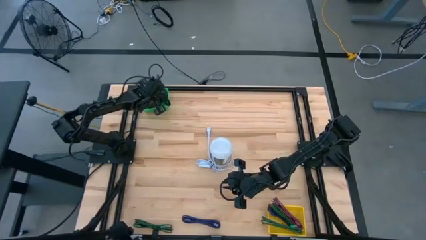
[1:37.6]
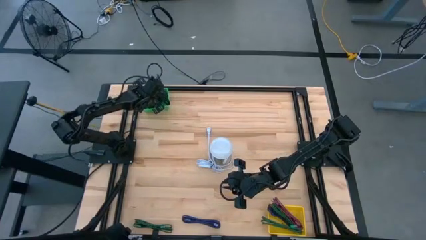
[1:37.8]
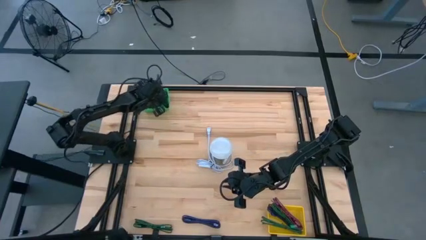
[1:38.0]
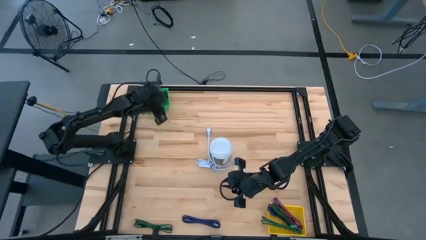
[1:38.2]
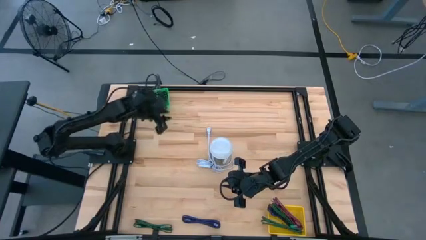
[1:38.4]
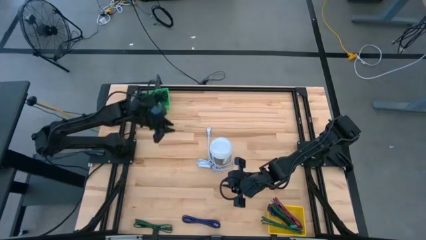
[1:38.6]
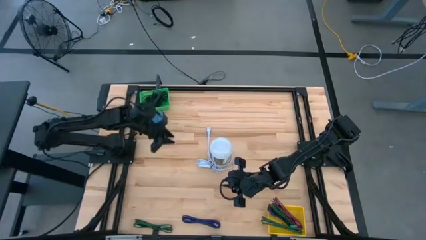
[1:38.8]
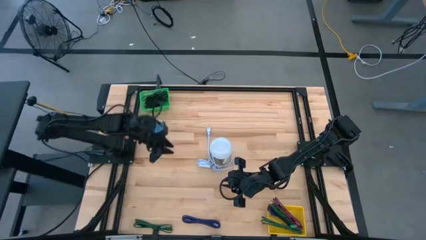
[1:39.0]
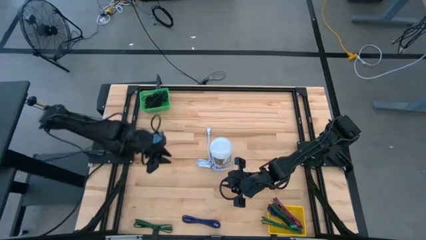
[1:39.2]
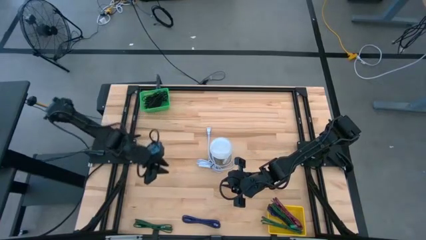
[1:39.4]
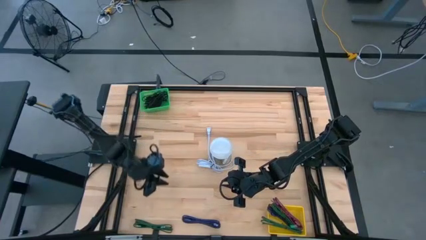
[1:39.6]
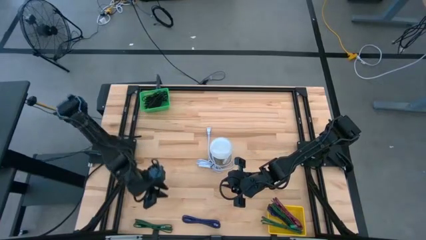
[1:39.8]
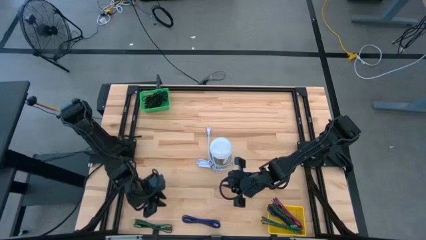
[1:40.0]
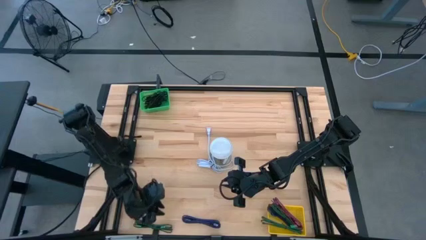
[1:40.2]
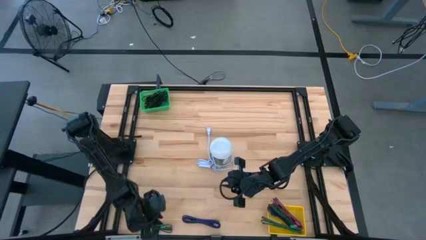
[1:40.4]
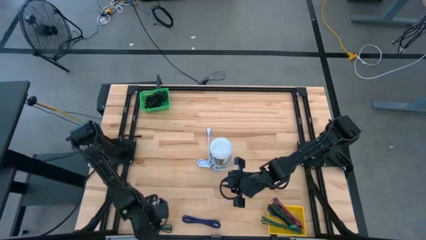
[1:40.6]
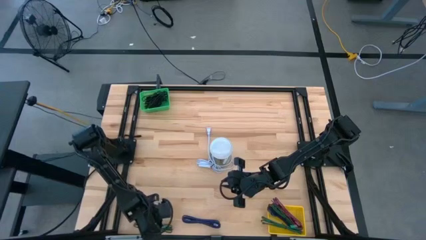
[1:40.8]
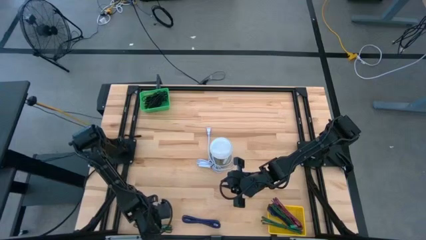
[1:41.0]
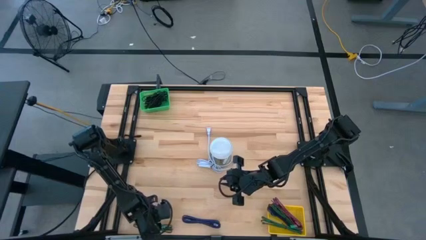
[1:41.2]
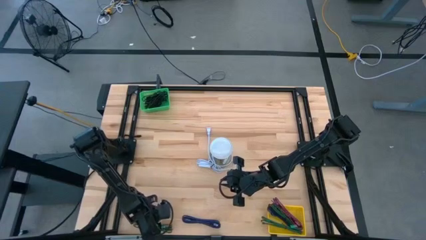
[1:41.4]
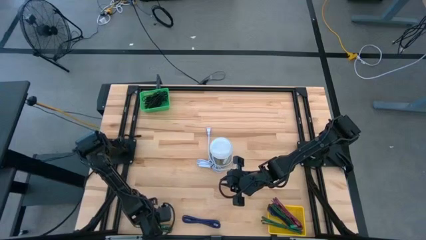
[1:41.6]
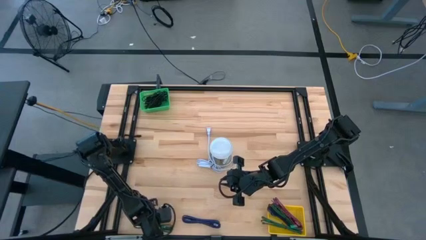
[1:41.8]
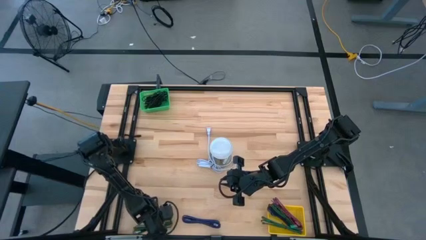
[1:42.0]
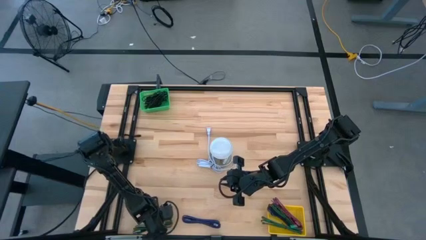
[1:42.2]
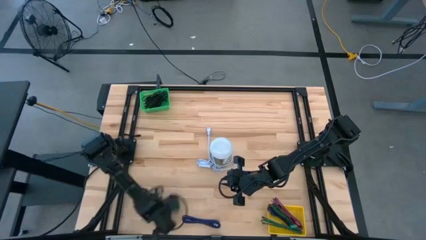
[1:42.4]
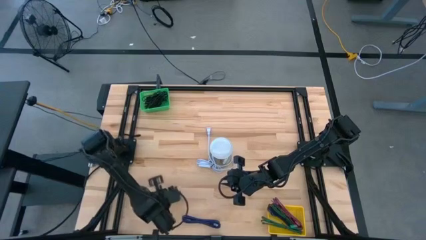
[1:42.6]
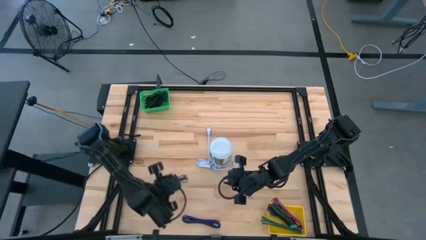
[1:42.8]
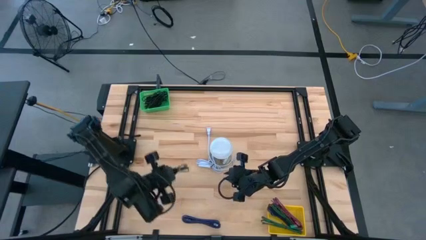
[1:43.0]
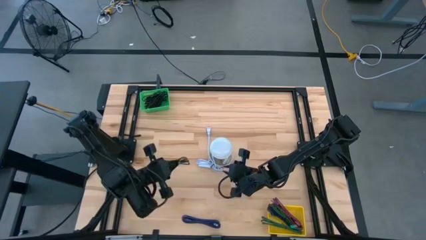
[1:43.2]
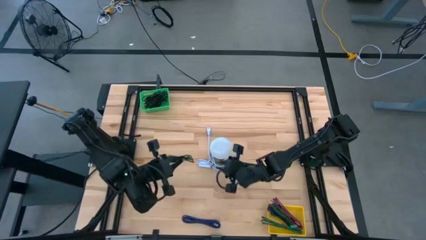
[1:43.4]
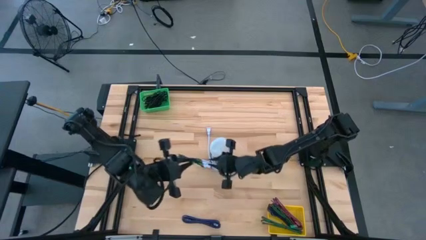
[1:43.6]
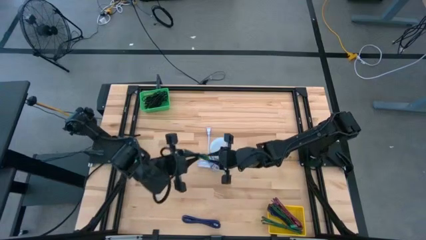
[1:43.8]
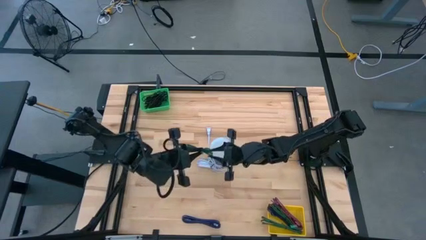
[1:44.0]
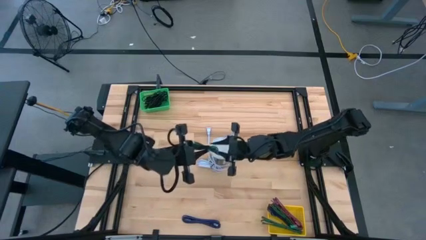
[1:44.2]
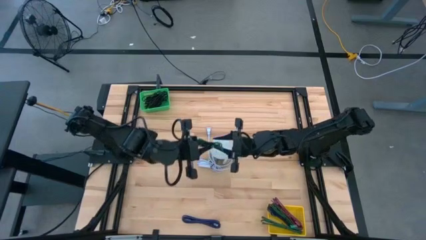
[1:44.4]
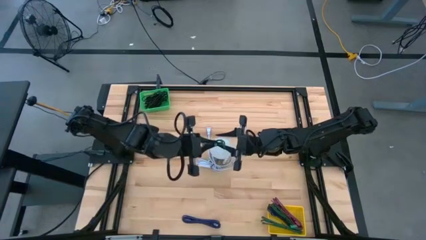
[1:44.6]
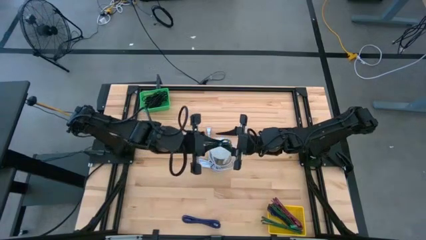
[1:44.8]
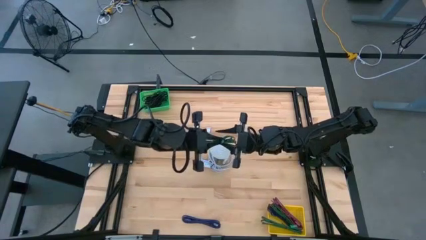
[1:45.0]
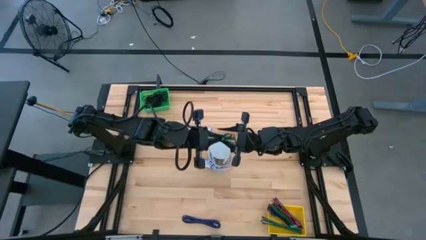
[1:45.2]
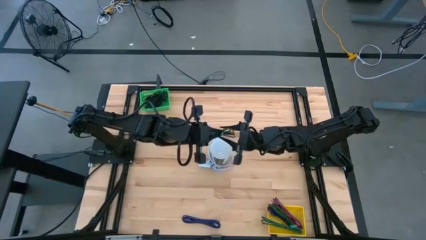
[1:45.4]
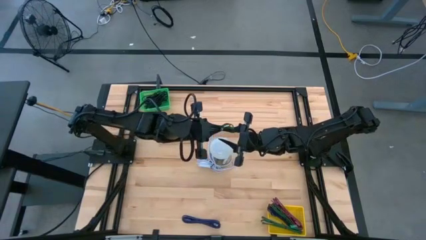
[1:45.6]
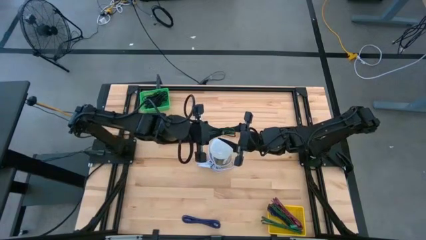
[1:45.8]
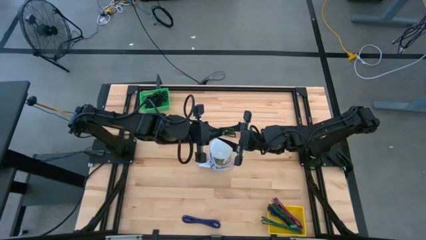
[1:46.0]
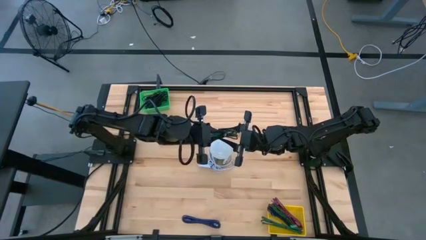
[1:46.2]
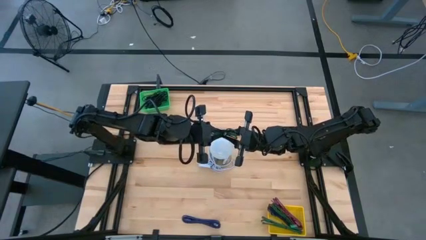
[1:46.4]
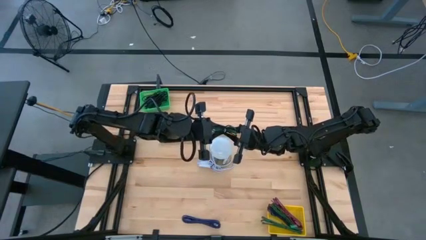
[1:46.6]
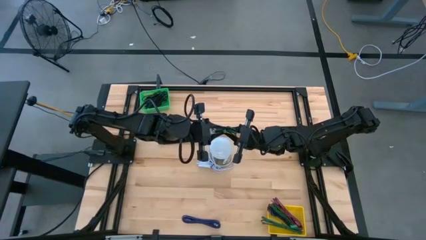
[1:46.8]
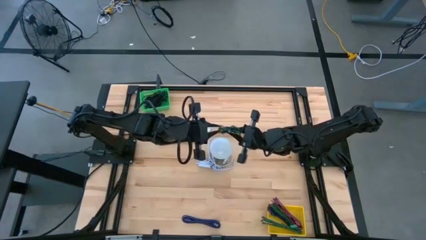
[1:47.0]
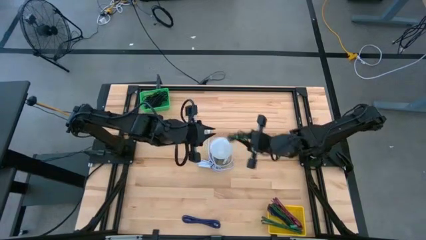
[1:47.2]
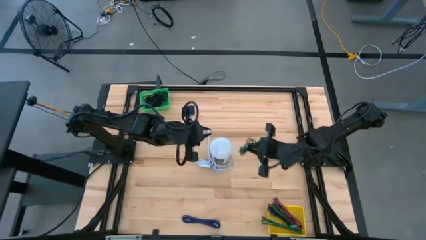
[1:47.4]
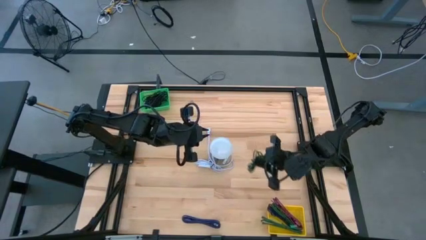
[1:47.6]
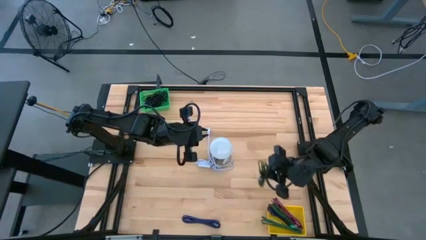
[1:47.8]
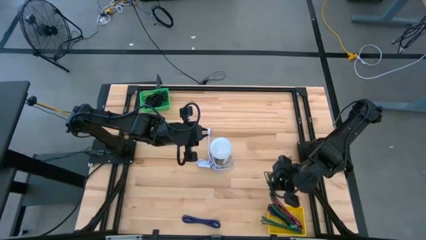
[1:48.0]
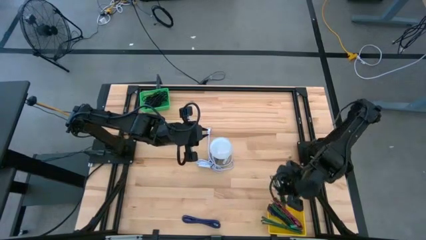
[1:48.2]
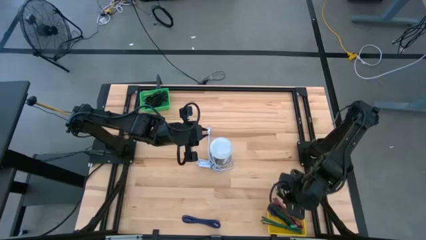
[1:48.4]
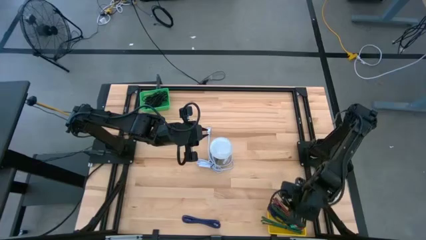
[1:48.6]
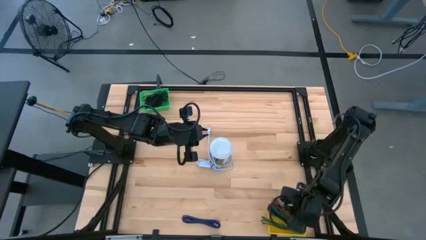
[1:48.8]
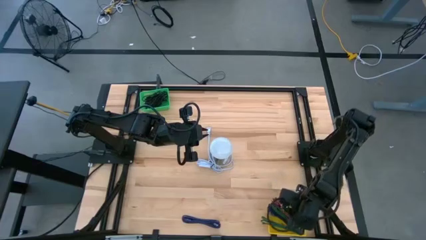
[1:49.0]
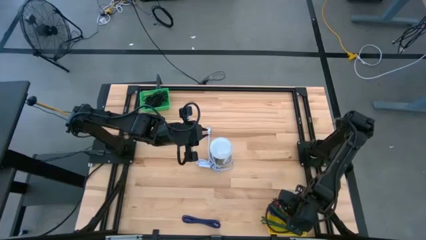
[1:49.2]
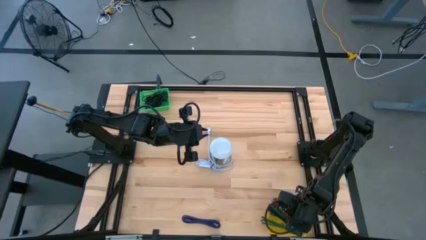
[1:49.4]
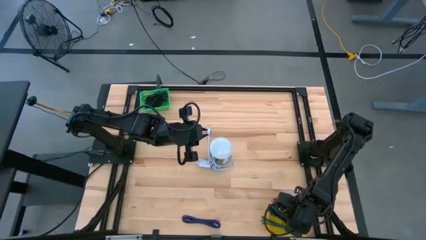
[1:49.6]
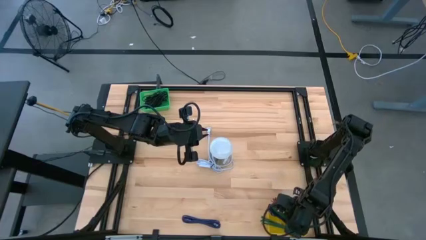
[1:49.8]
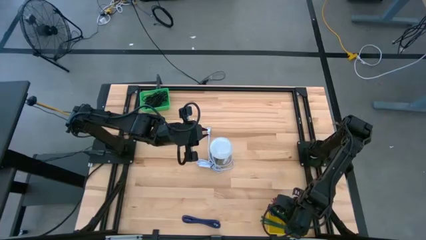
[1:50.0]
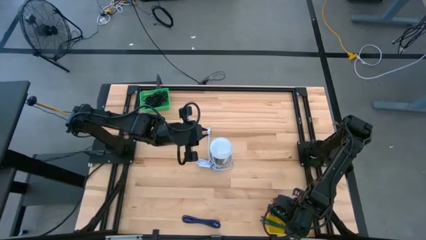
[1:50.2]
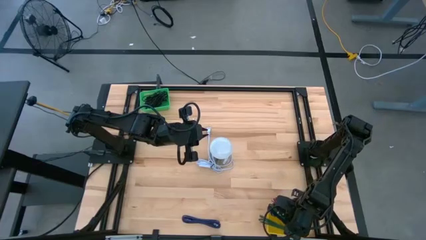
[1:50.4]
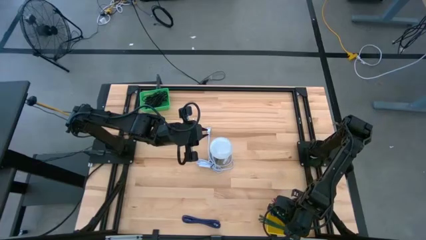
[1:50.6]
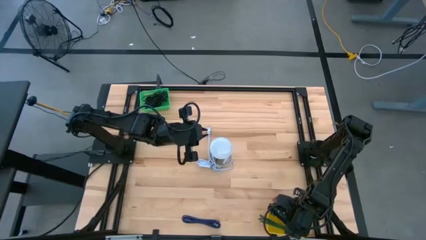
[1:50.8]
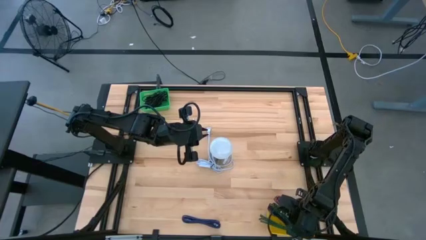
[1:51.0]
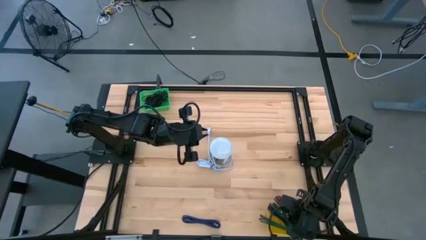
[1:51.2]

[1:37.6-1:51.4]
Task: Pick & Place USB Port
Put the green black charger cable into the yellow basket

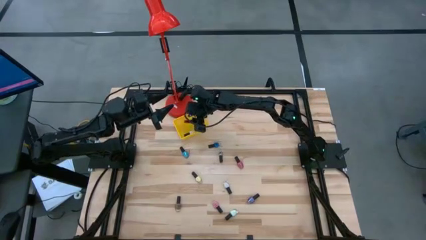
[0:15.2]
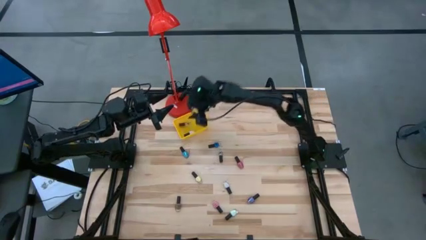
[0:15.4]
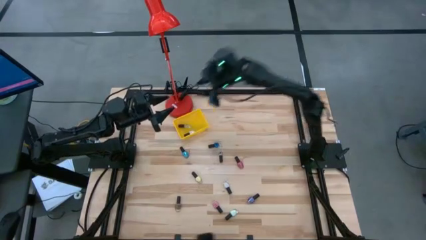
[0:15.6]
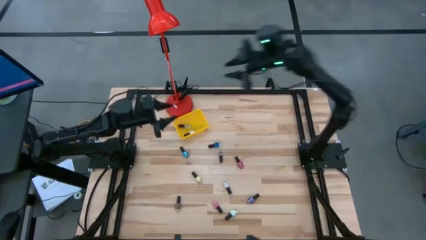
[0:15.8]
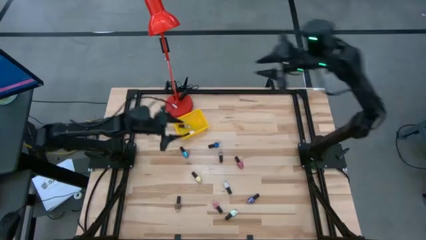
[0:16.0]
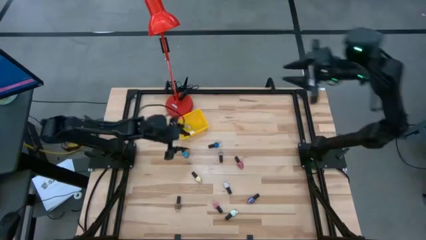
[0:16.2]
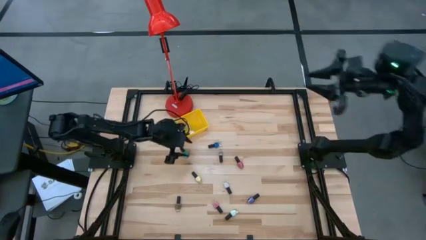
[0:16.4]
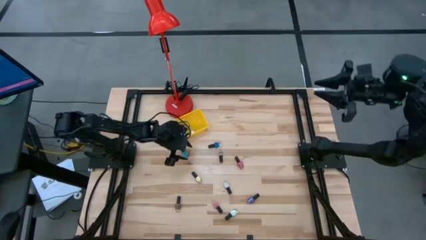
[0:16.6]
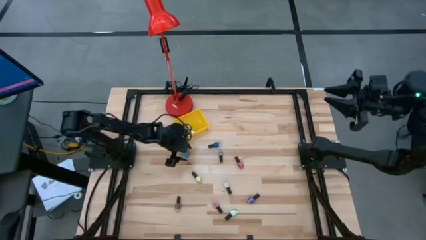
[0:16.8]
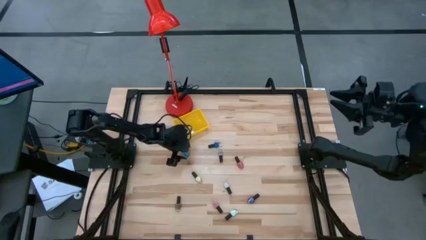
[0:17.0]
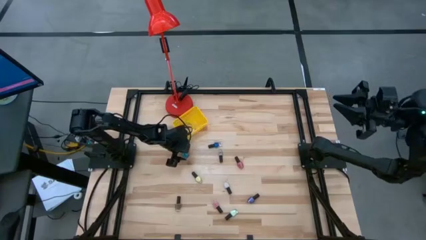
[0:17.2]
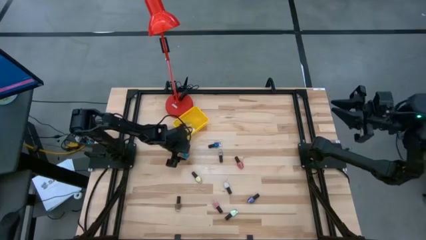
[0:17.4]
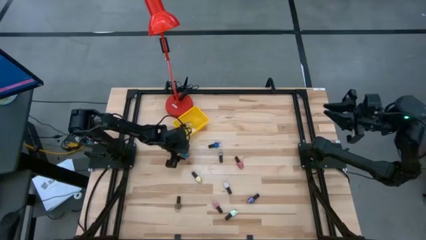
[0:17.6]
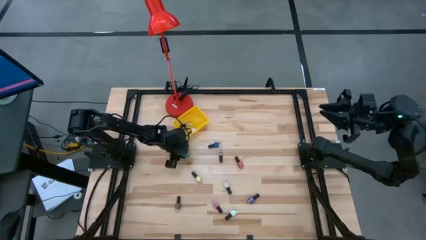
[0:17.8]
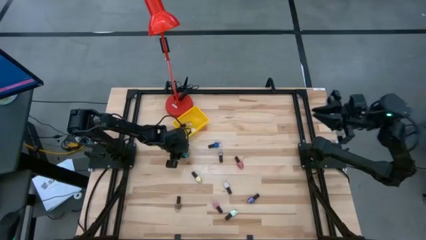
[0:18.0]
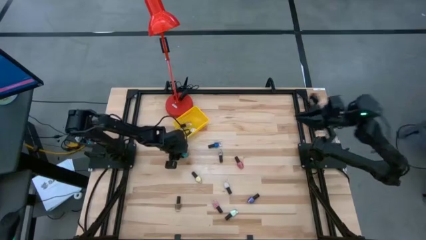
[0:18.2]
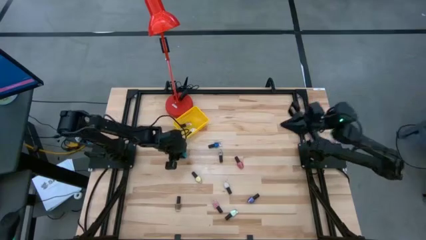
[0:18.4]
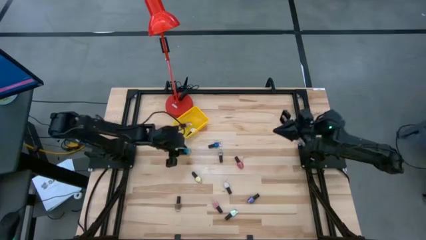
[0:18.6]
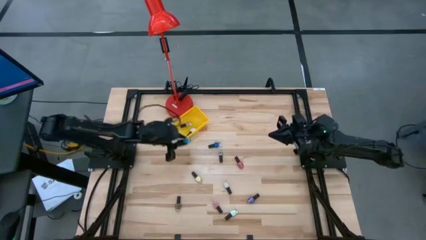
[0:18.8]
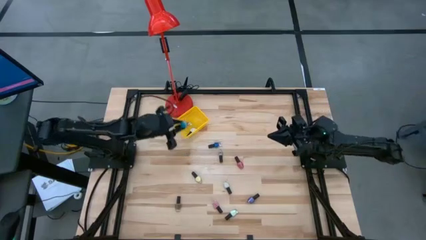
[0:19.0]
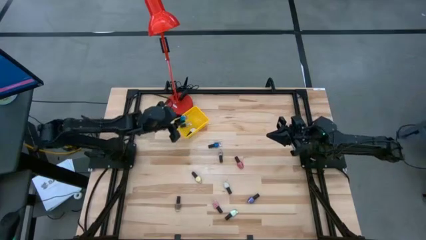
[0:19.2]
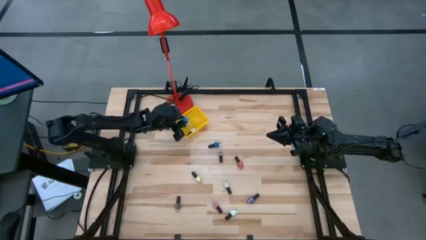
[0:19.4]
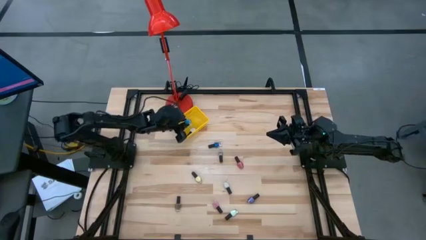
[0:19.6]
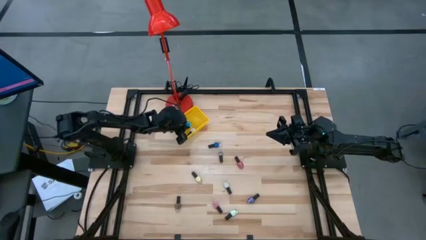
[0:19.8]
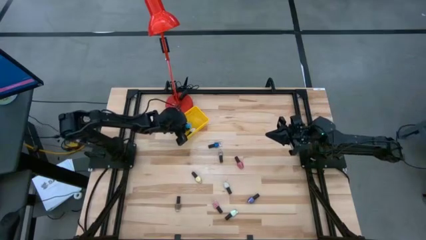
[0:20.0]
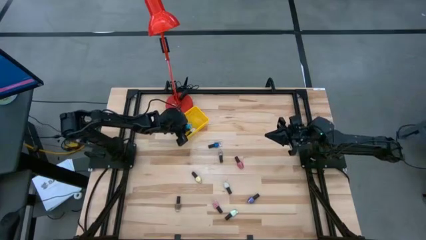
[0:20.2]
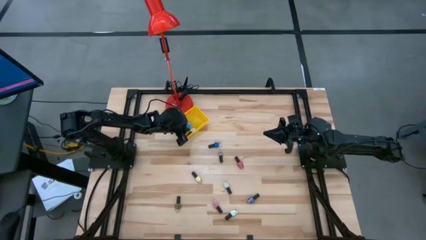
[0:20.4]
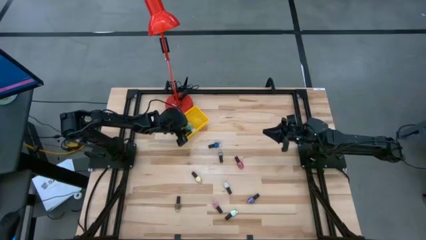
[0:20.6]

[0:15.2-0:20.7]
Task: Pick & Place Nail Polish
Put the light blue nail polish into the yellow basket
